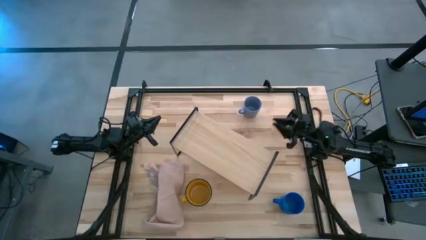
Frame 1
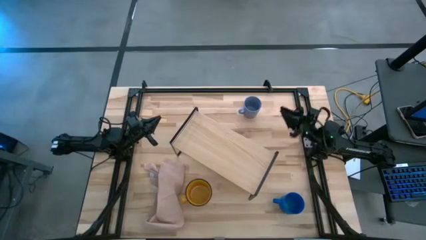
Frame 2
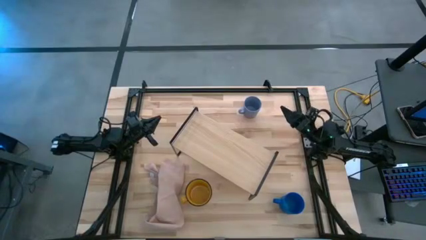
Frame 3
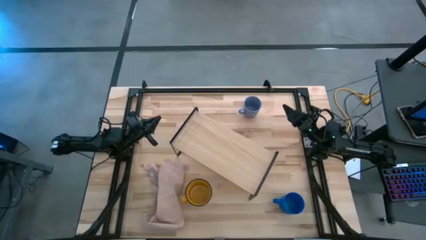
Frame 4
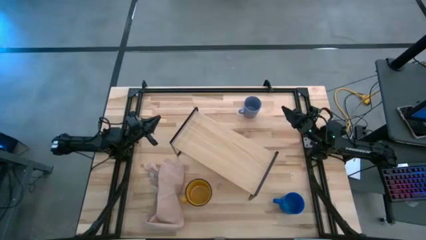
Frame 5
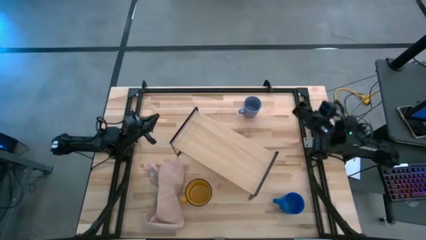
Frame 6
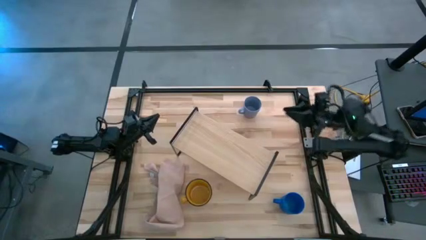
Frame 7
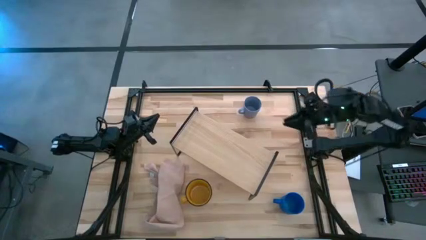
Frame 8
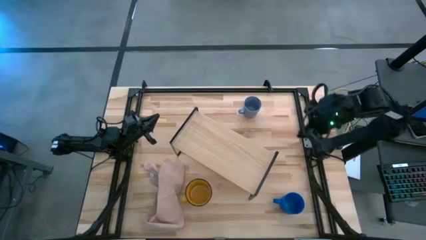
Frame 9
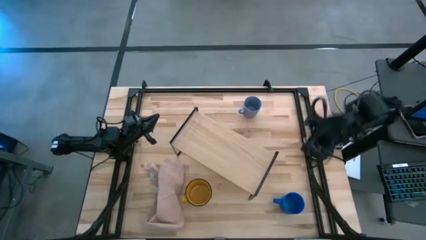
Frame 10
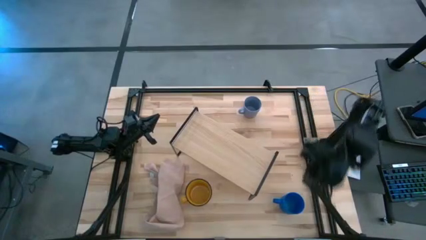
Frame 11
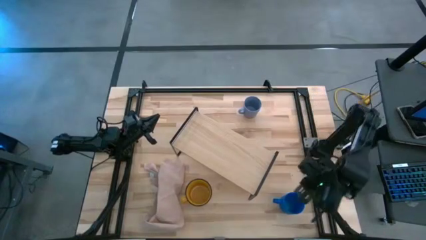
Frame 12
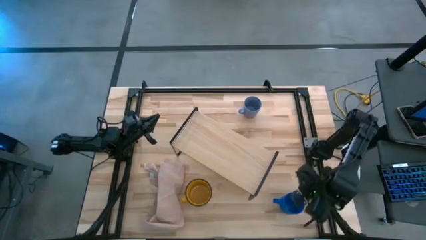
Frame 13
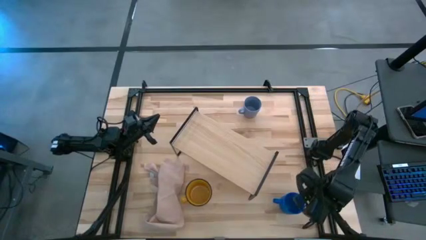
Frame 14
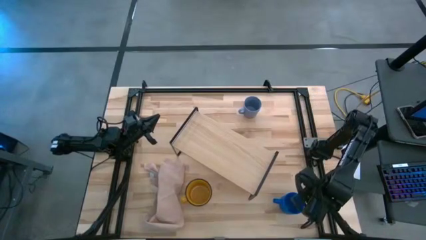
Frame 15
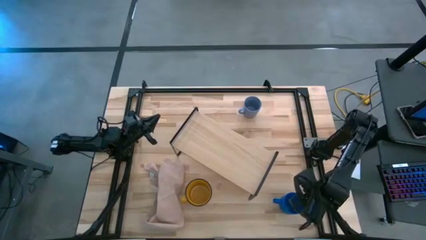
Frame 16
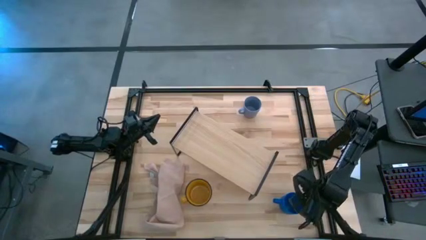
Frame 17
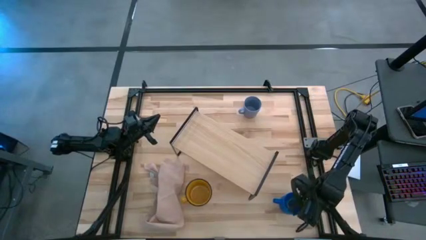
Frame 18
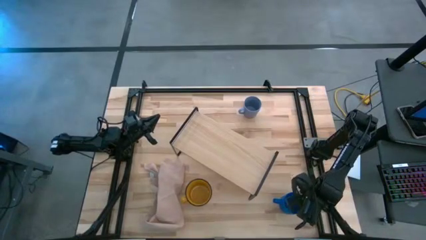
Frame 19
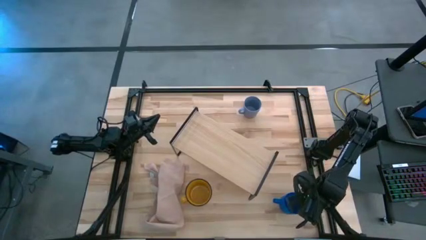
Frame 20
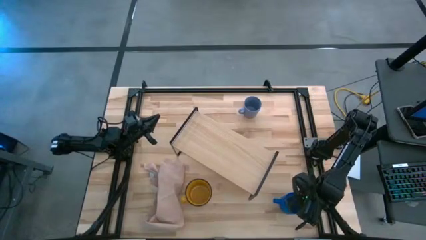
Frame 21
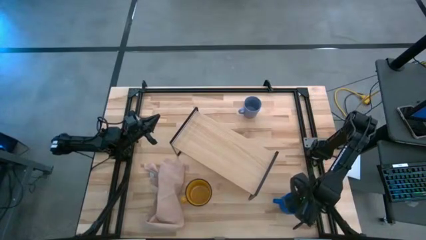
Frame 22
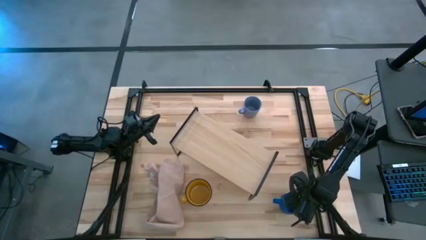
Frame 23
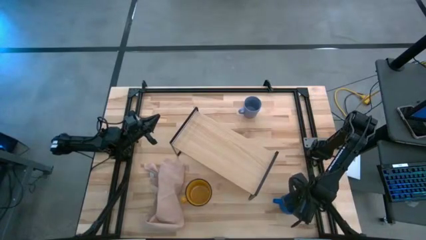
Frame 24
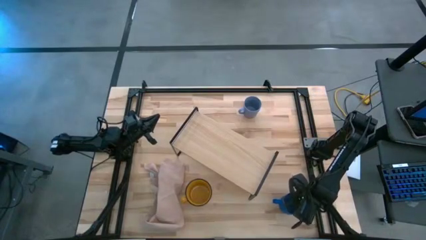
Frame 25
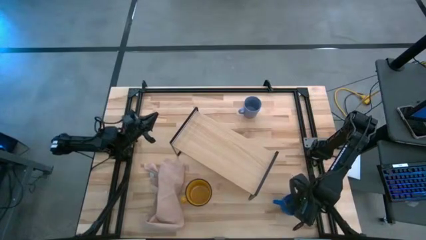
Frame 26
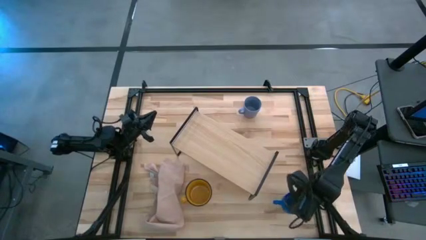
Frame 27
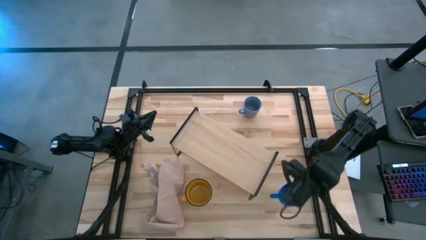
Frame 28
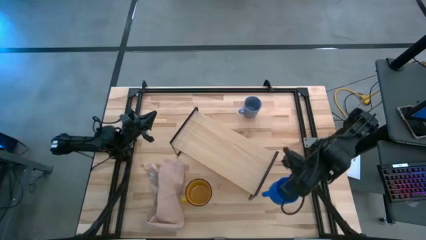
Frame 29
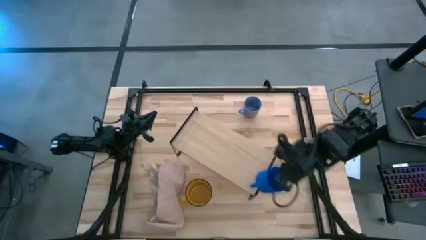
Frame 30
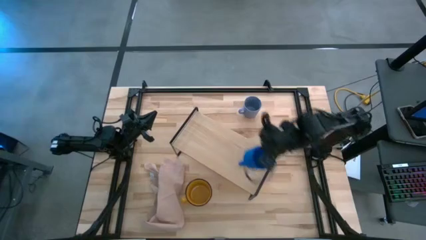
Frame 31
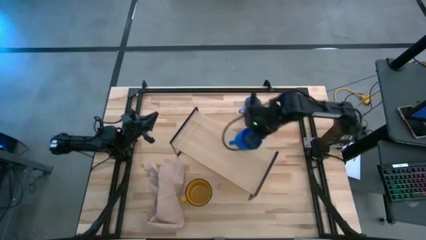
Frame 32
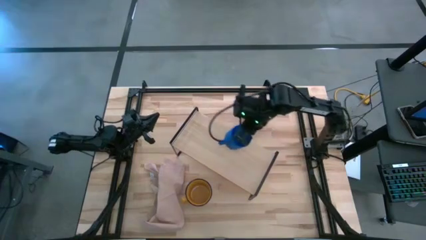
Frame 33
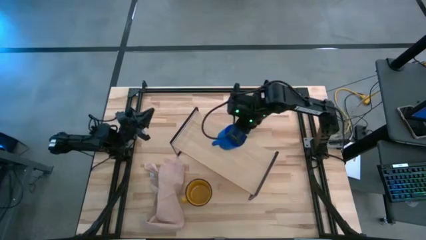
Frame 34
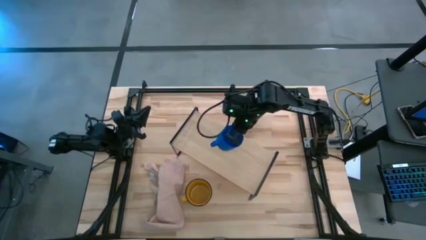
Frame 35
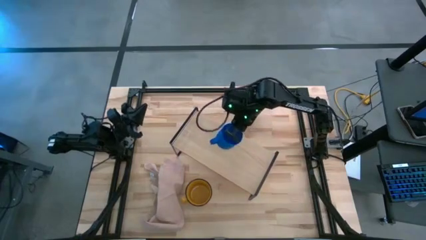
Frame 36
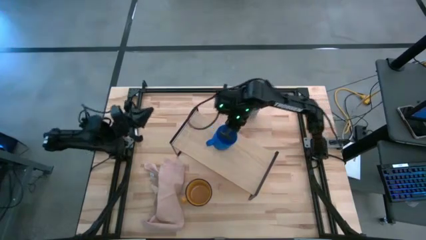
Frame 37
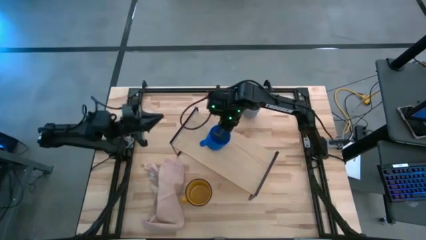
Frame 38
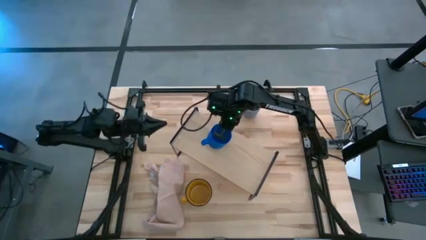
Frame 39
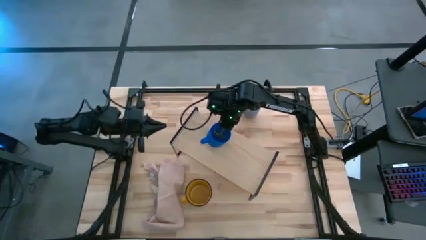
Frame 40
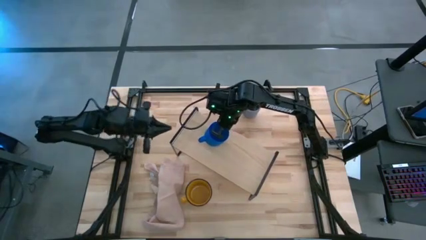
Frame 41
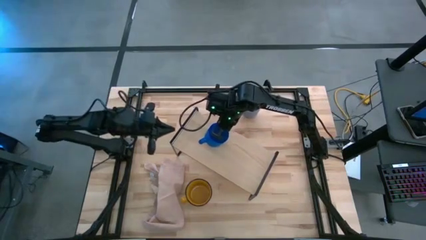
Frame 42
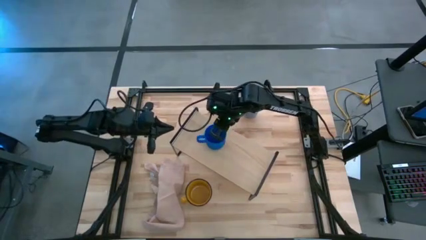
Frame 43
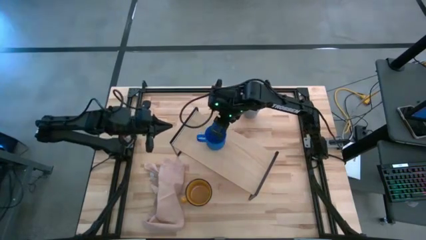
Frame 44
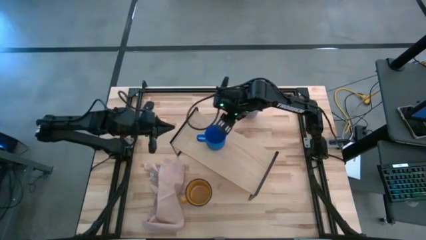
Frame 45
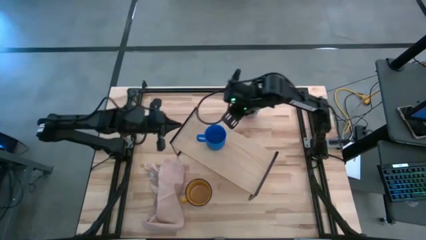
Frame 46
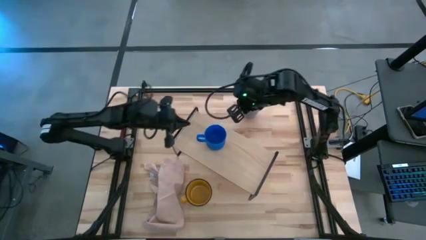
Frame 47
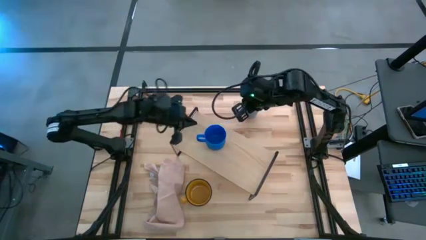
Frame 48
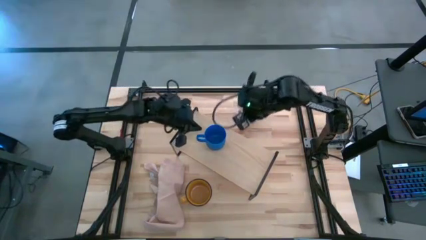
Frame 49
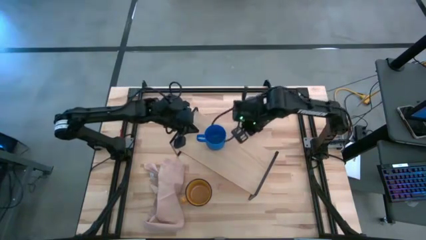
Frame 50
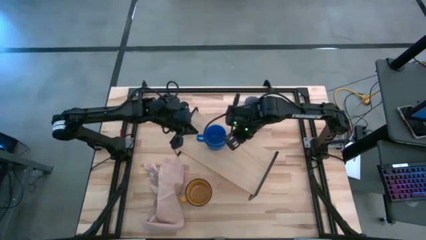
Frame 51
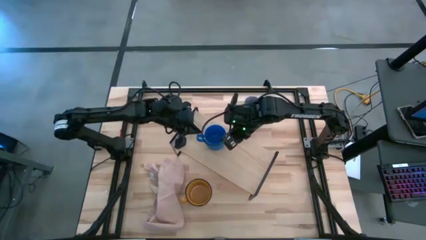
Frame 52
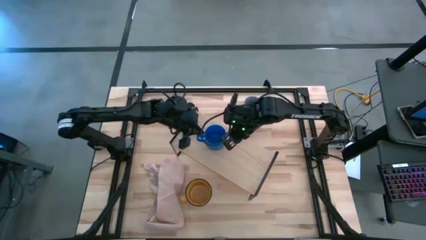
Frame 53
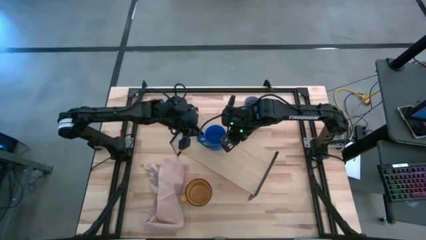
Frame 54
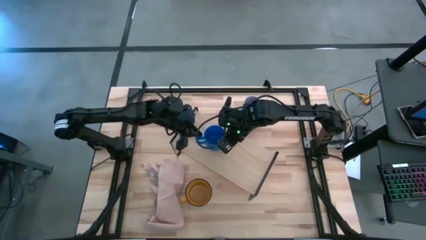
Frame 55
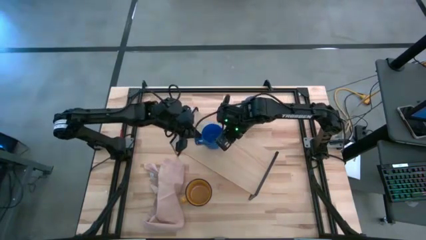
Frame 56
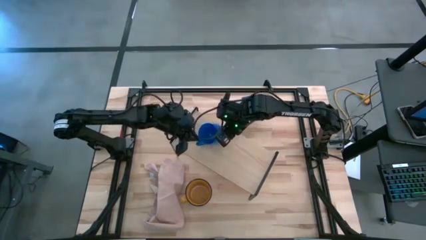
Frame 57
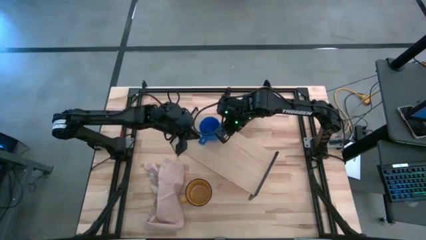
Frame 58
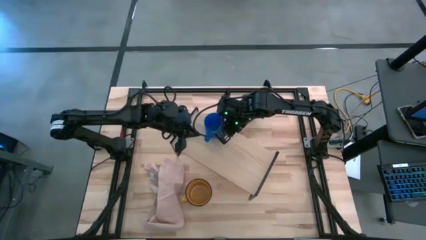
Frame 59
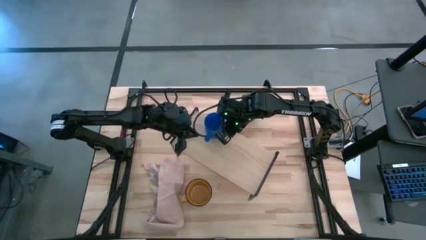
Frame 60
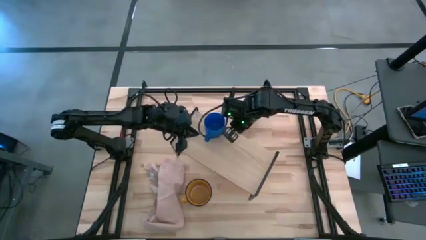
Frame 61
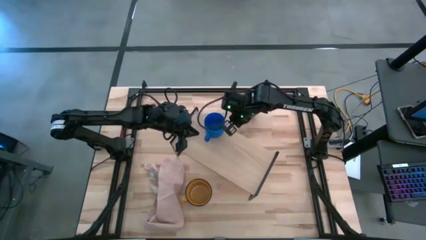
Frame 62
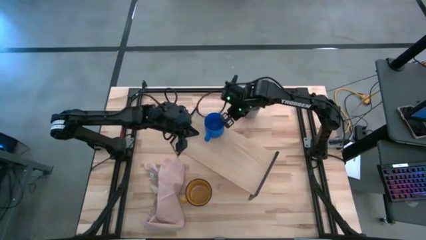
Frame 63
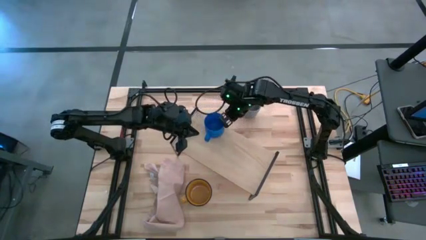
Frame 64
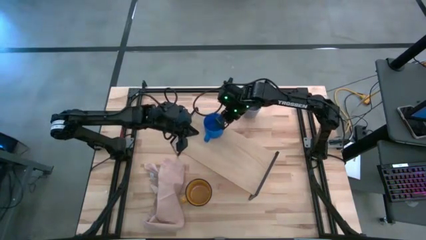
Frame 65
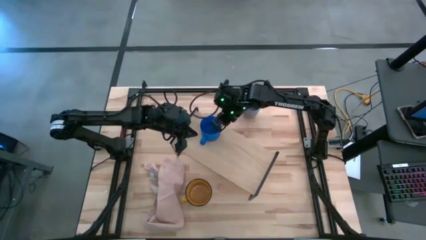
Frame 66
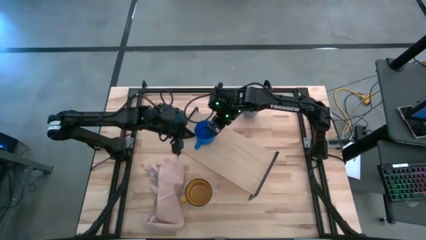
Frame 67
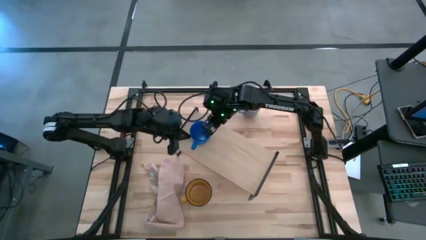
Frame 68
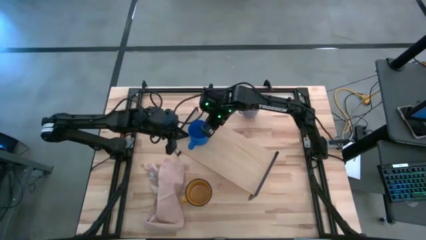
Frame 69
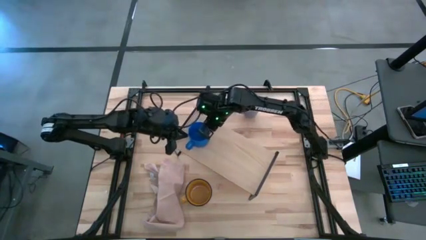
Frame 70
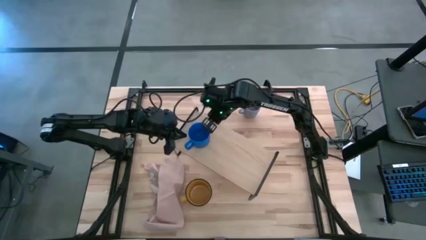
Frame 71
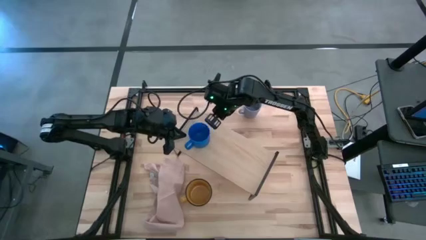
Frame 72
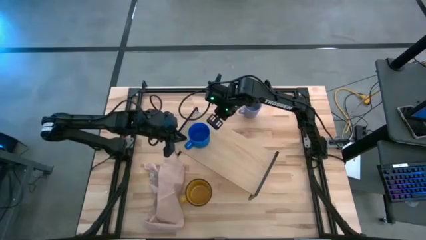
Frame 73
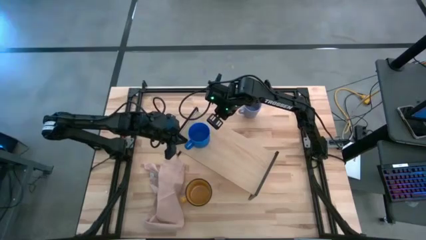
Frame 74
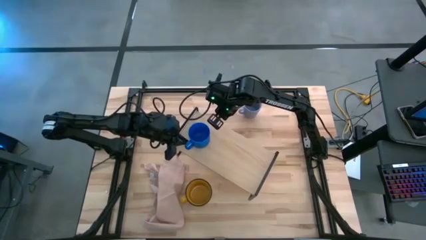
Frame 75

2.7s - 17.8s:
Task: Stack small to large cups/mugs on shelf
Put the blue mug on the shelf
